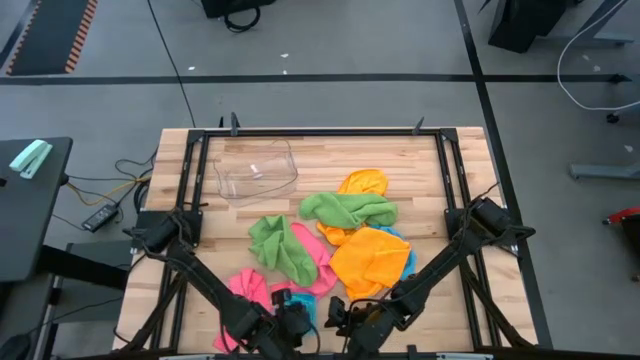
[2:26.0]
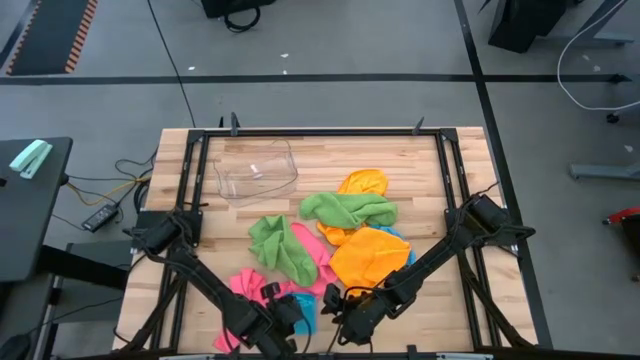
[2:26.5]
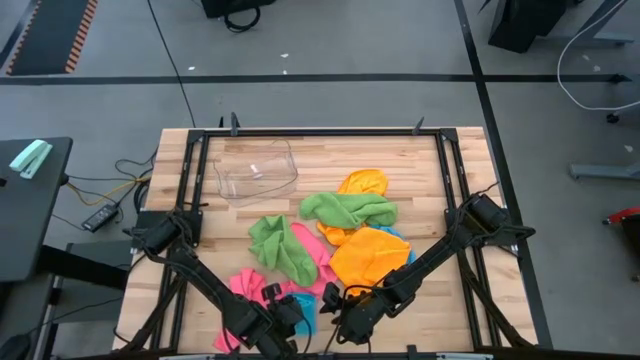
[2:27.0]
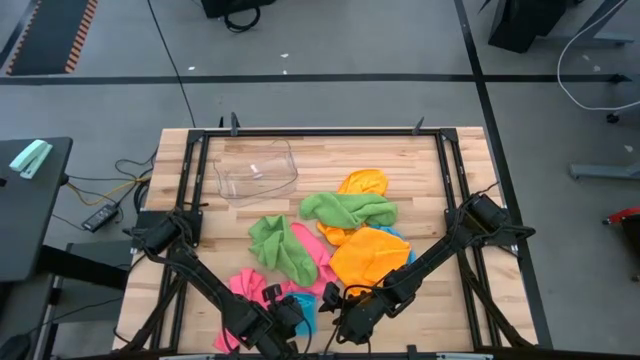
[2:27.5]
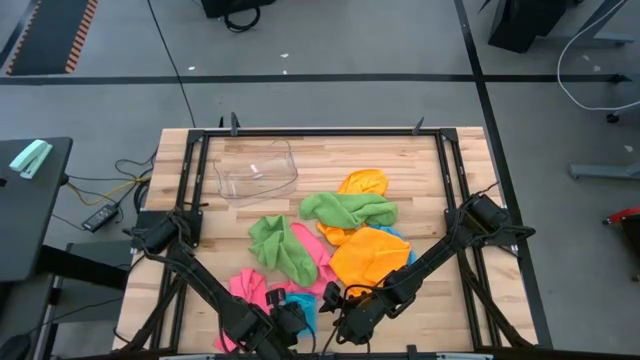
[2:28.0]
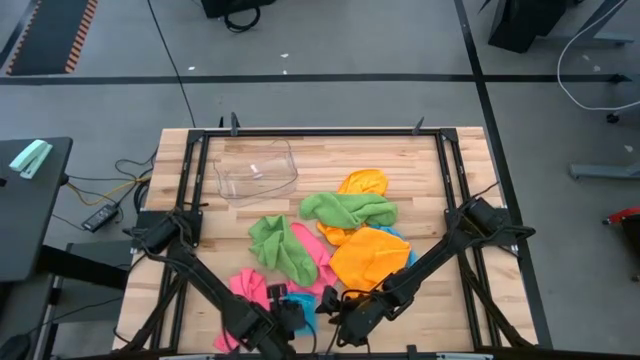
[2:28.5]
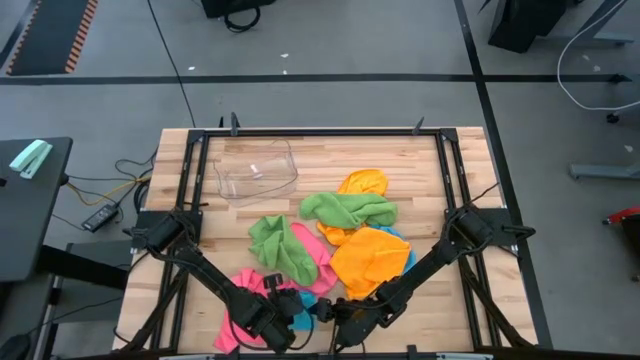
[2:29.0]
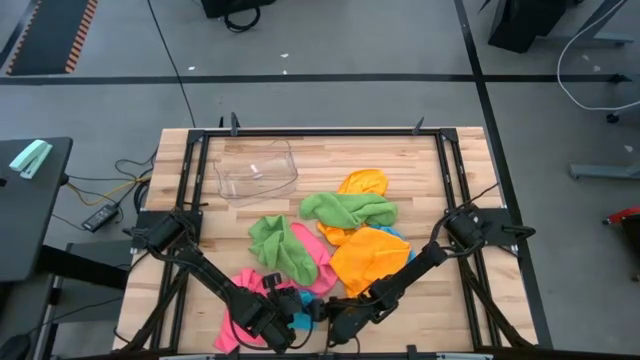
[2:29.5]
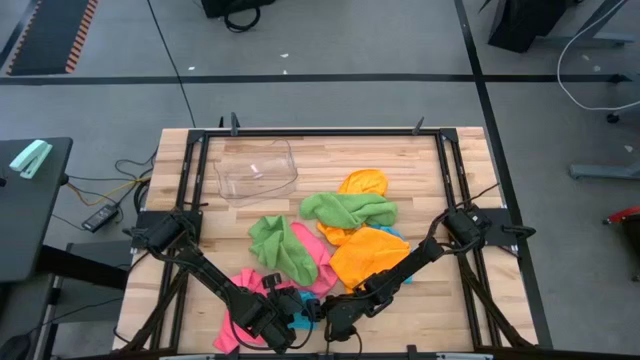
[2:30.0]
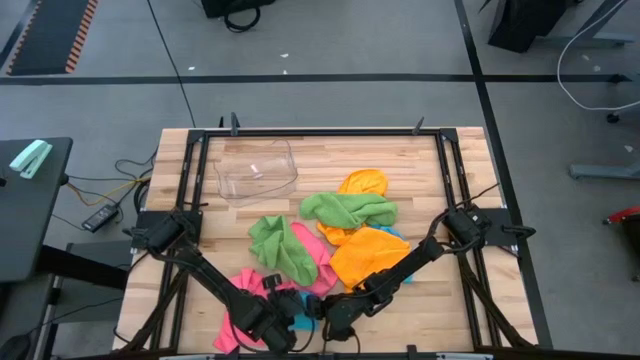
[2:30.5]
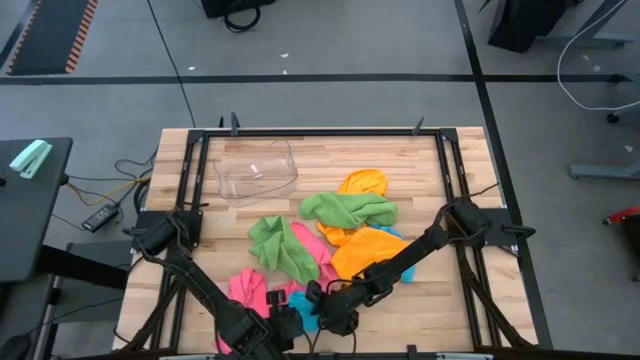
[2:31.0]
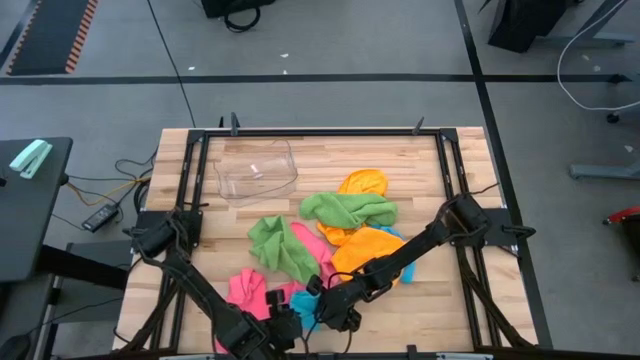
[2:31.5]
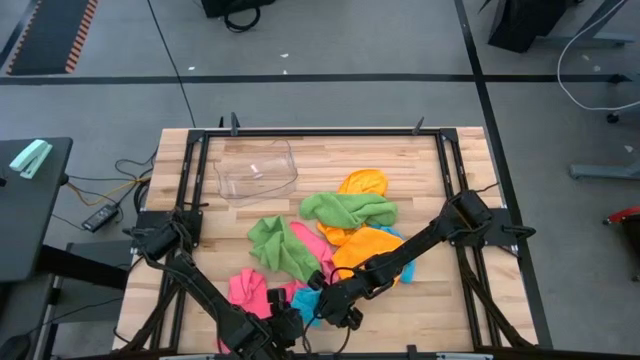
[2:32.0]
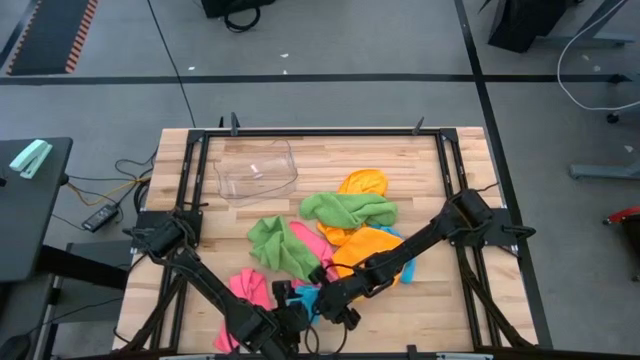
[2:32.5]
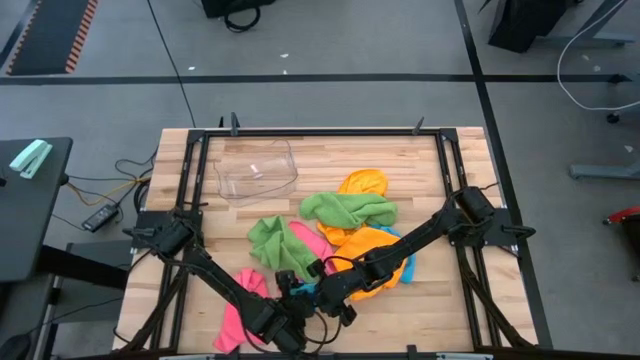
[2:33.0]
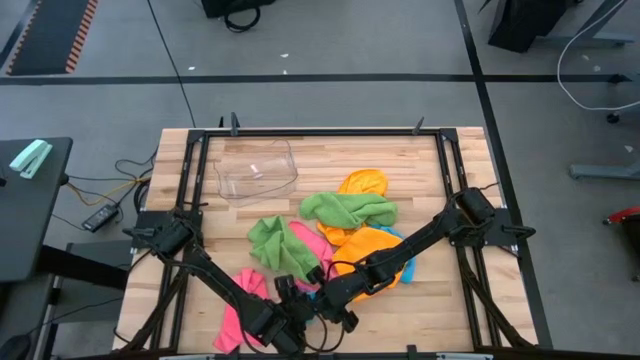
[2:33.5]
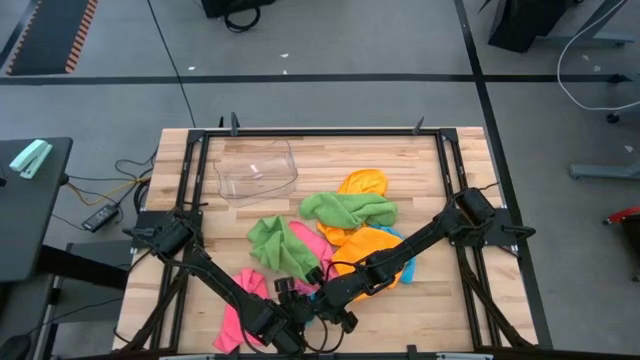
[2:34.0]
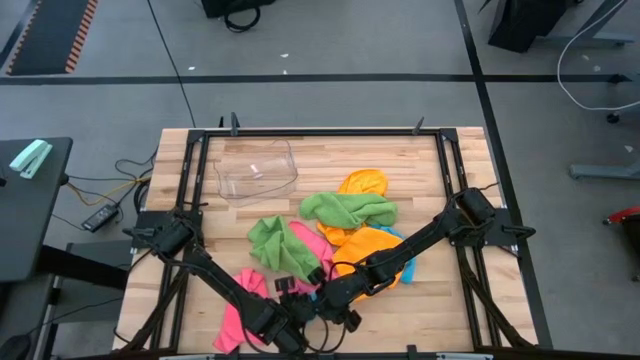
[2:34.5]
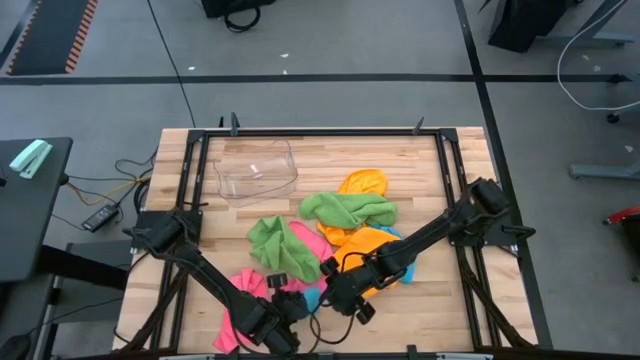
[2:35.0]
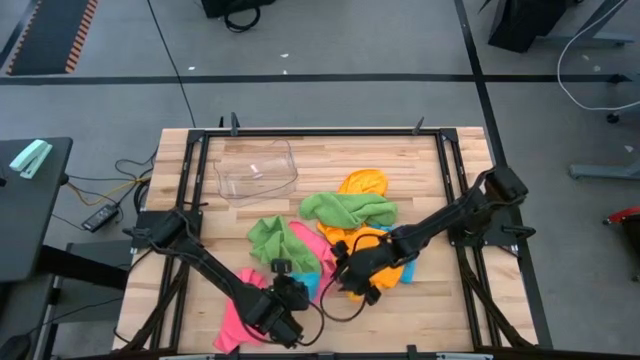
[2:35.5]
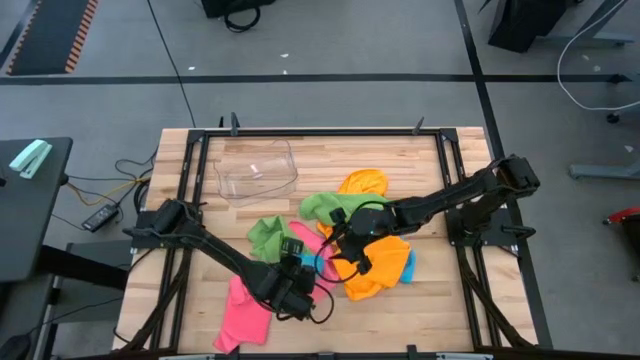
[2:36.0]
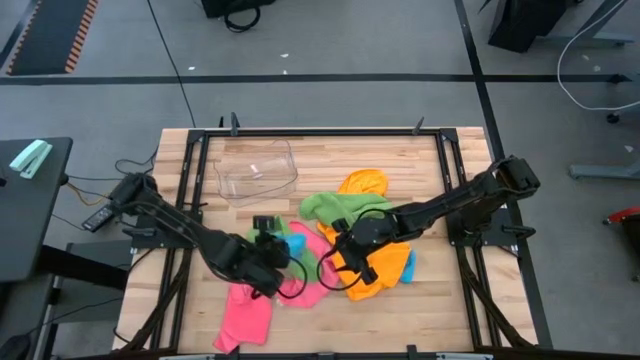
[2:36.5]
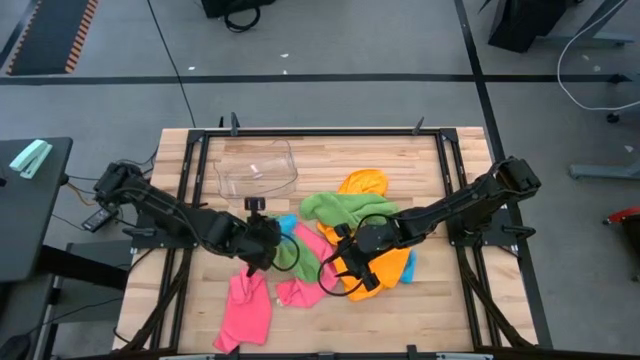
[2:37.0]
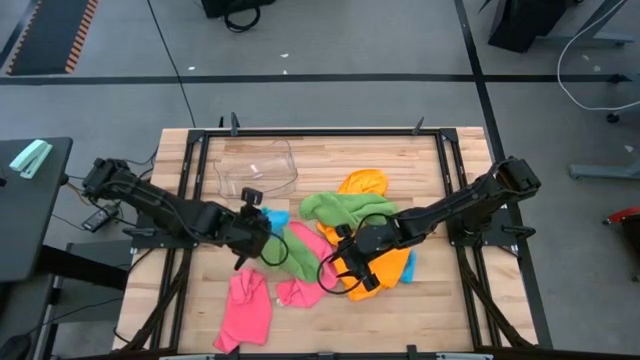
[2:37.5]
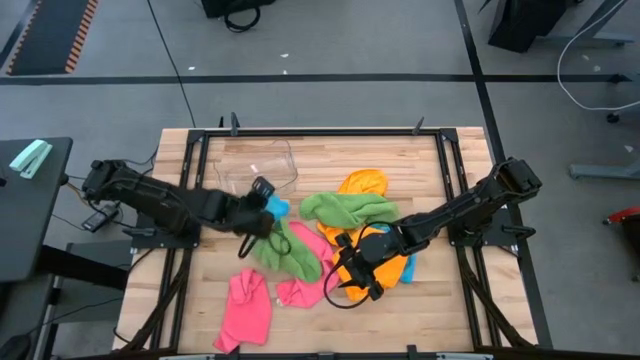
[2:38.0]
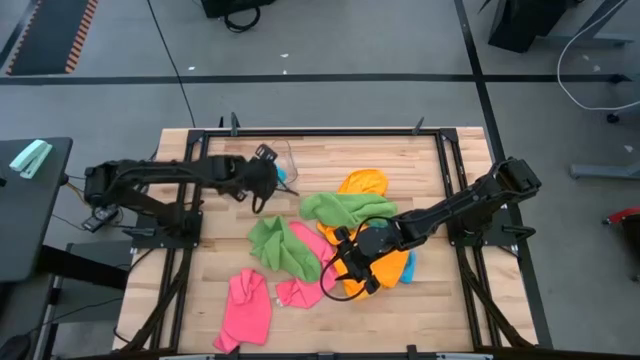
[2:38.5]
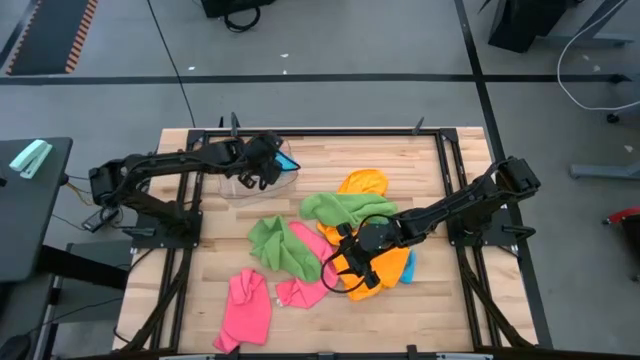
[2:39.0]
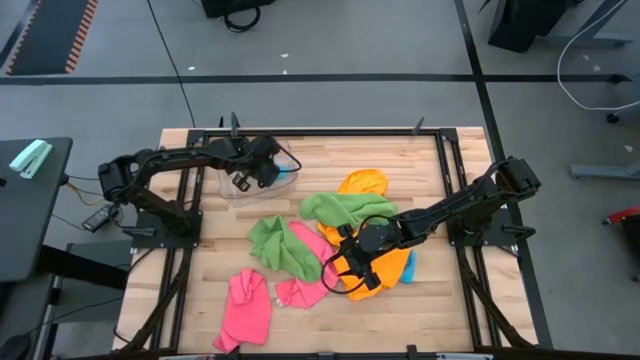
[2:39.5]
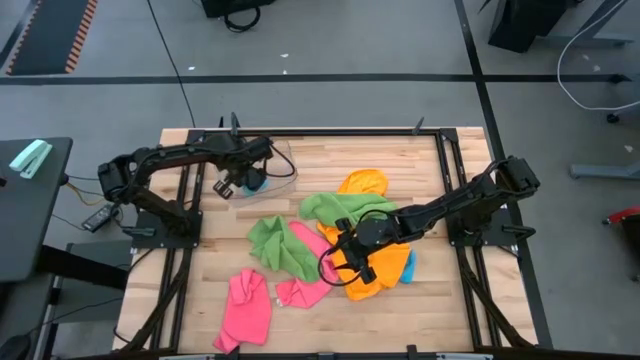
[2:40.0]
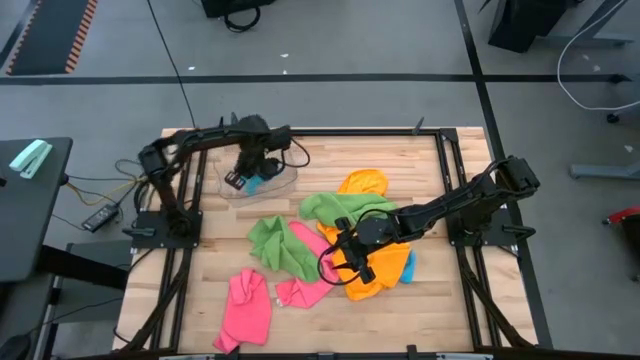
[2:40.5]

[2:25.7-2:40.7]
Task: Fold microfiber towels
Put the left blue microfiber towel into the transparent bin

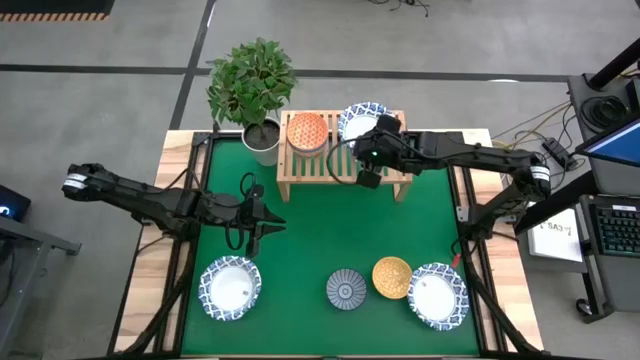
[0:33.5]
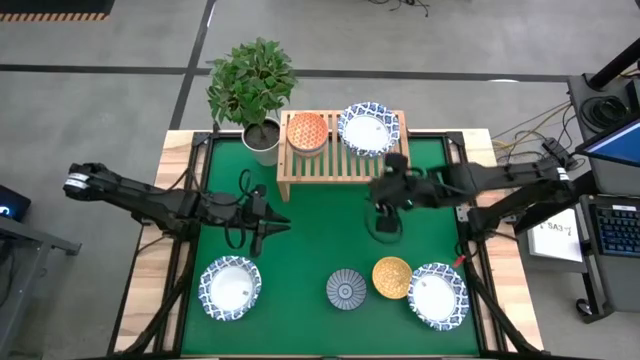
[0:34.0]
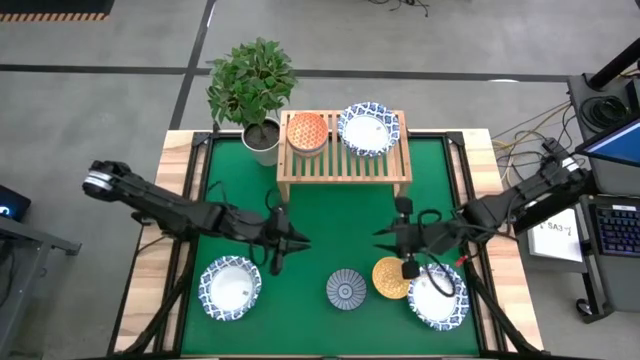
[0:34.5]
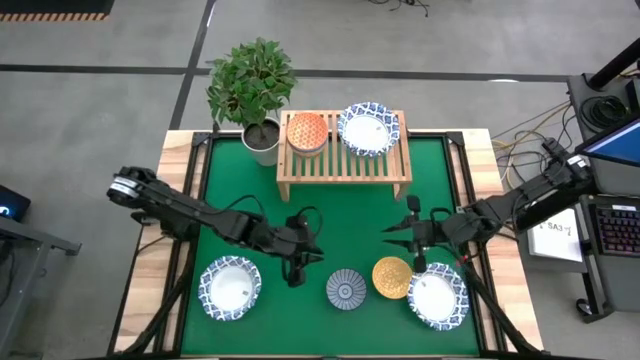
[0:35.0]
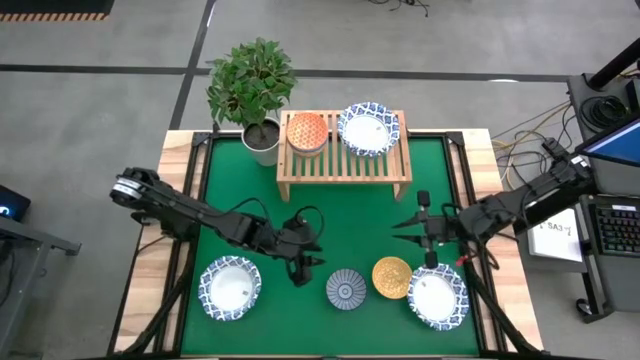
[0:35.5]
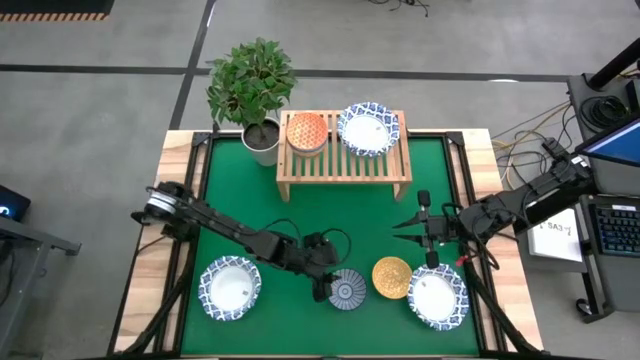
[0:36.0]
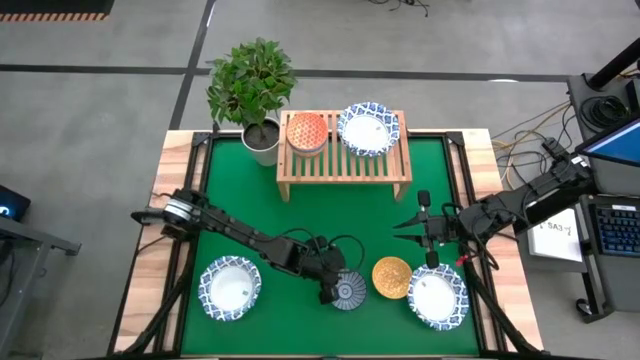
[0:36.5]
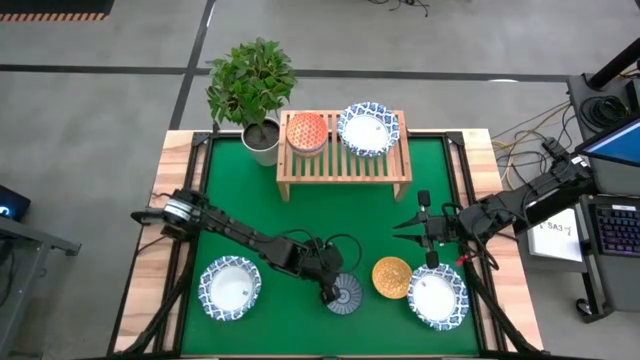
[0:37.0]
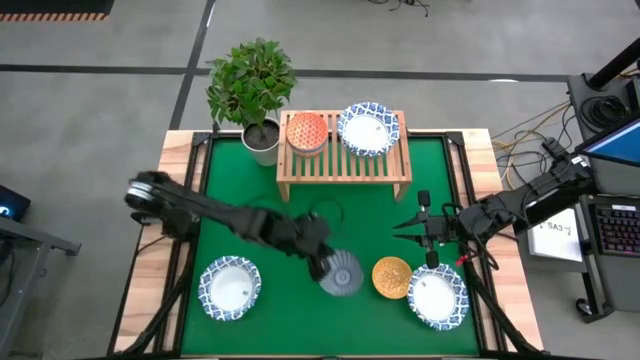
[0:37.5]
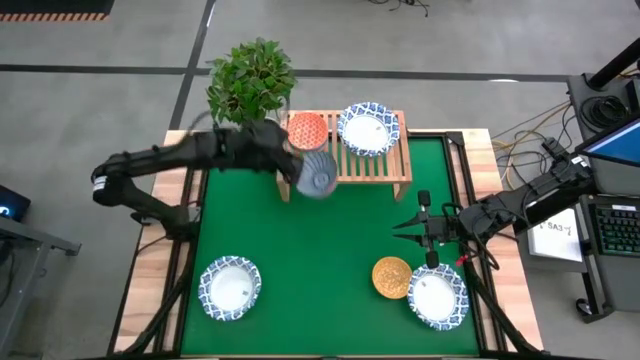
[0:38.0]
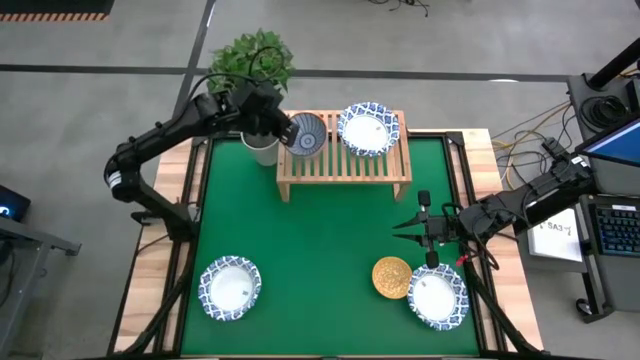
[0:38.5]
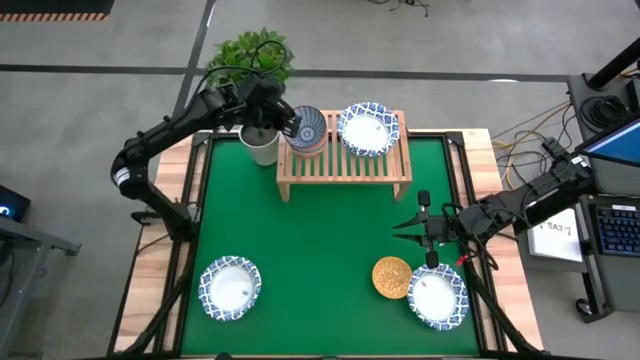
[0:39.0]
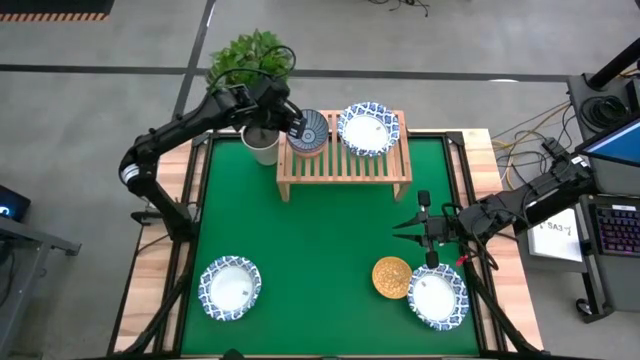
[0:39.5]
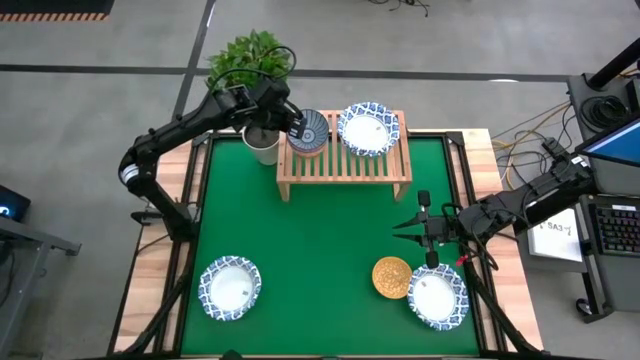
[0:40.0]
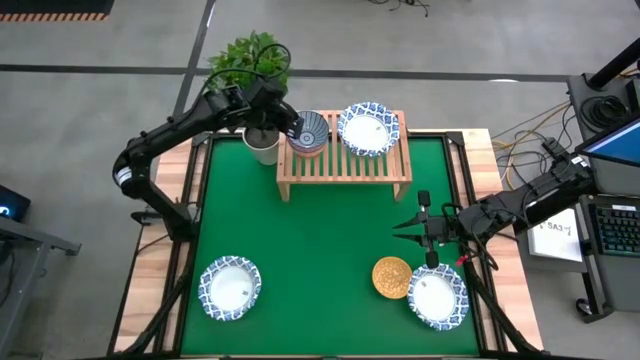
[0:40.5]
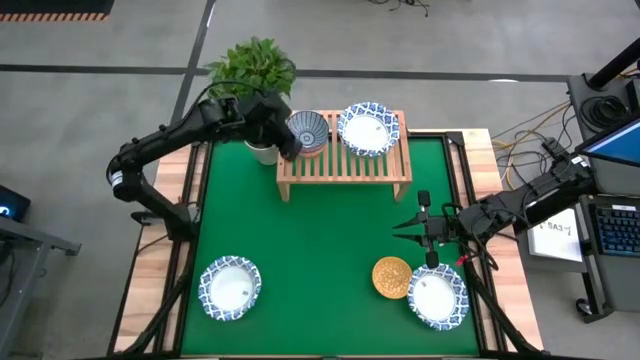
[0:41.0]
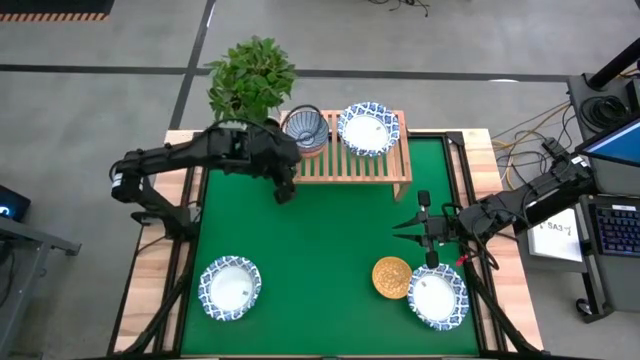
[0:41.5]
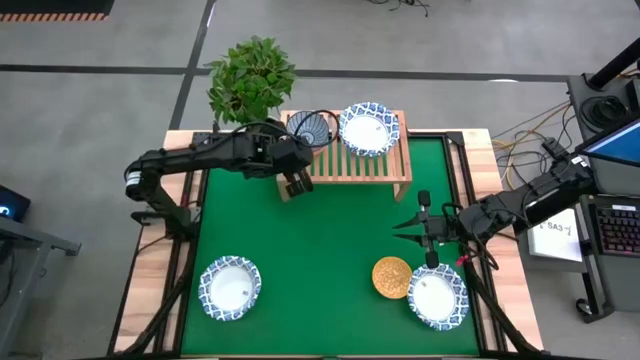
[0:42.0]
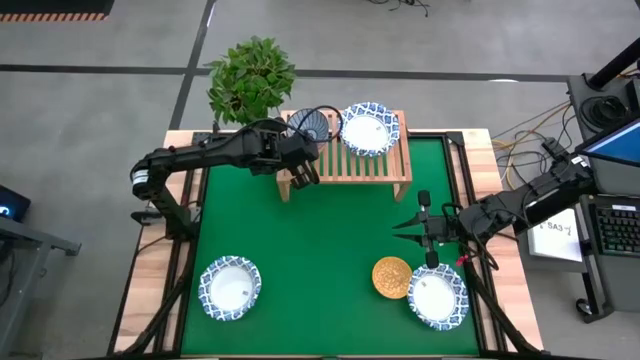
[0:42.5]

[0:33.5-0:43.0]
Task: Place and stack bowls onto a shelf
Stack the dark blue patterned bowl on top of the orange patterned bowl on the shelf
